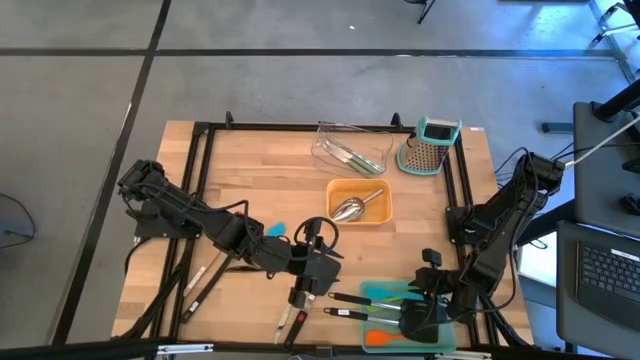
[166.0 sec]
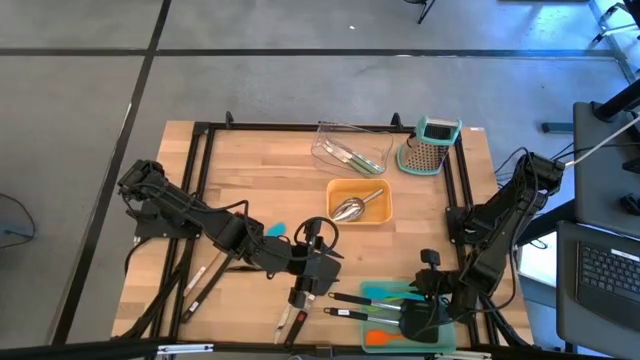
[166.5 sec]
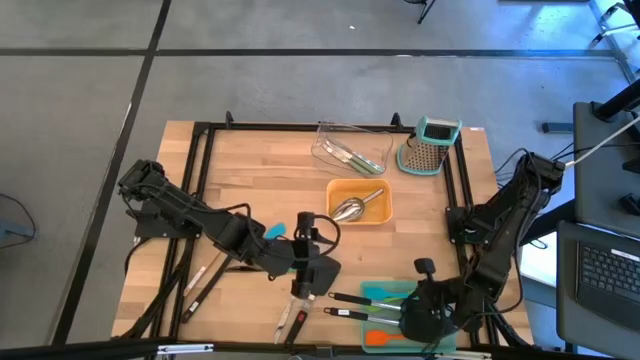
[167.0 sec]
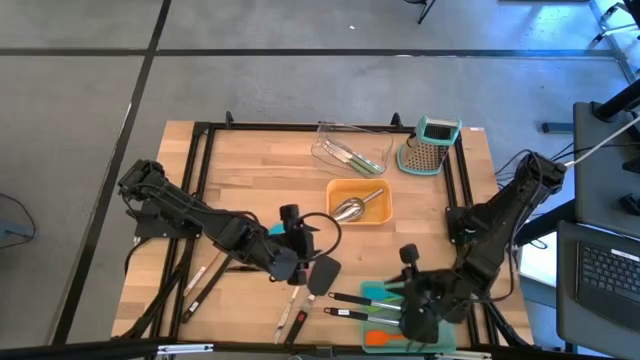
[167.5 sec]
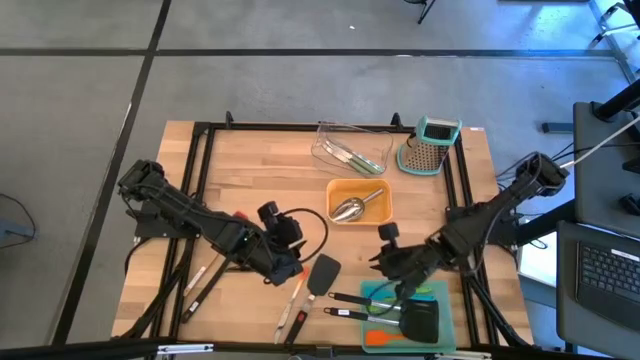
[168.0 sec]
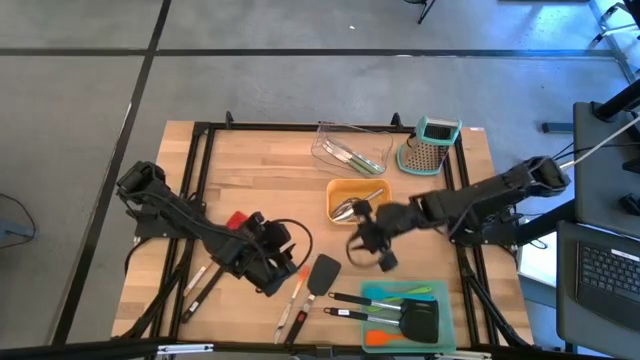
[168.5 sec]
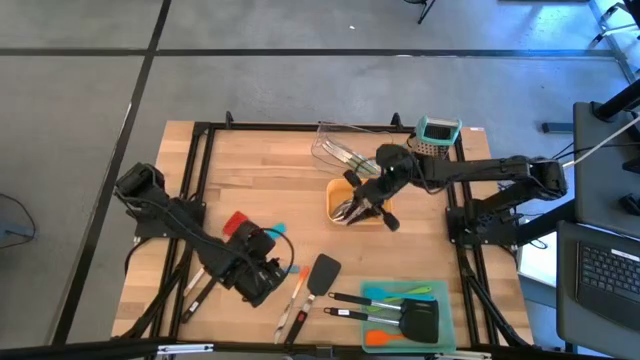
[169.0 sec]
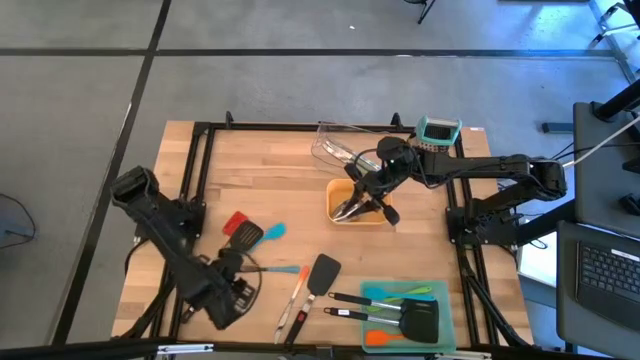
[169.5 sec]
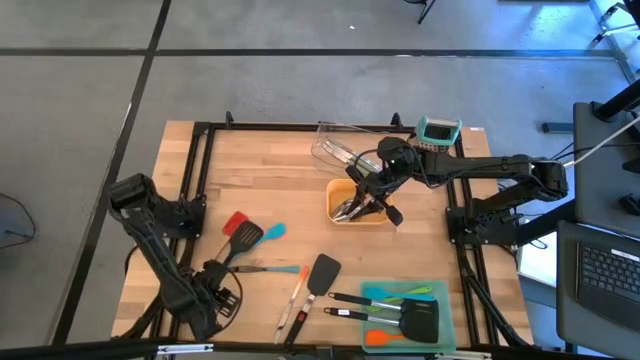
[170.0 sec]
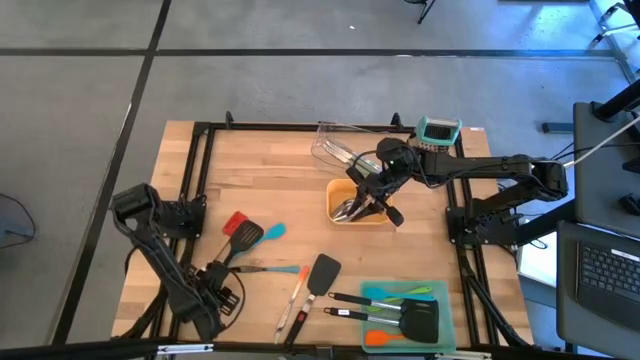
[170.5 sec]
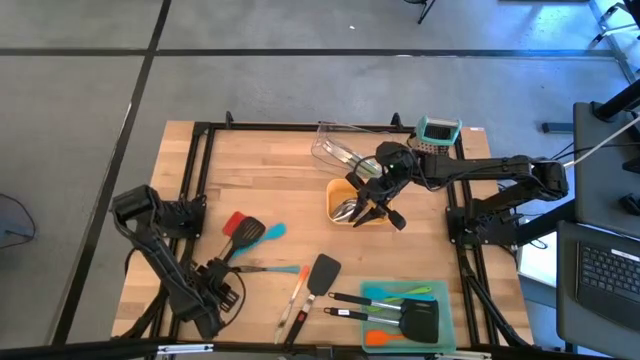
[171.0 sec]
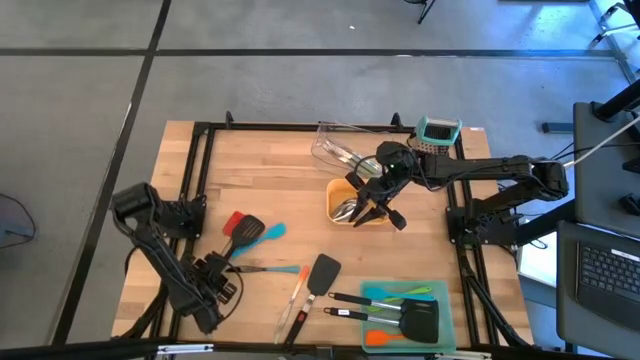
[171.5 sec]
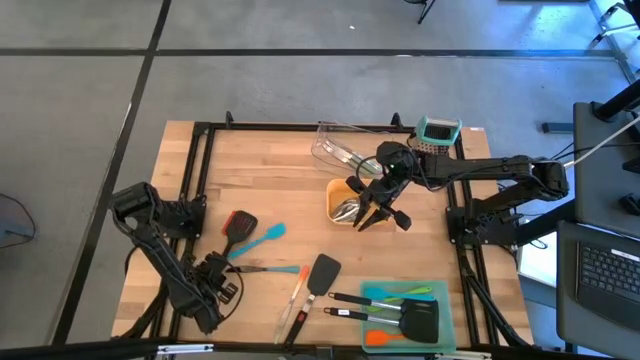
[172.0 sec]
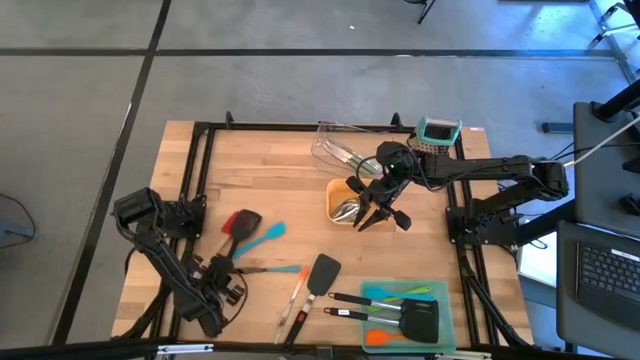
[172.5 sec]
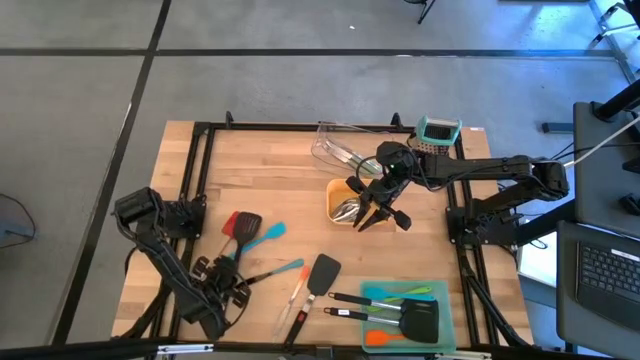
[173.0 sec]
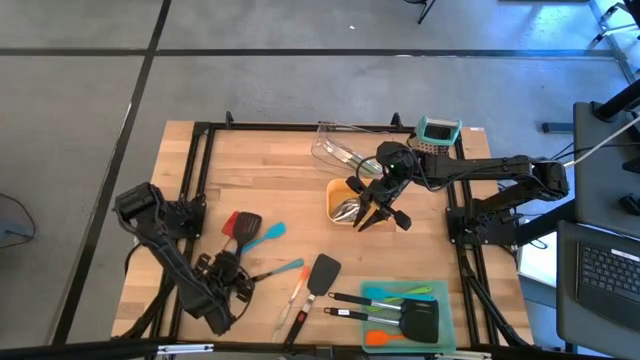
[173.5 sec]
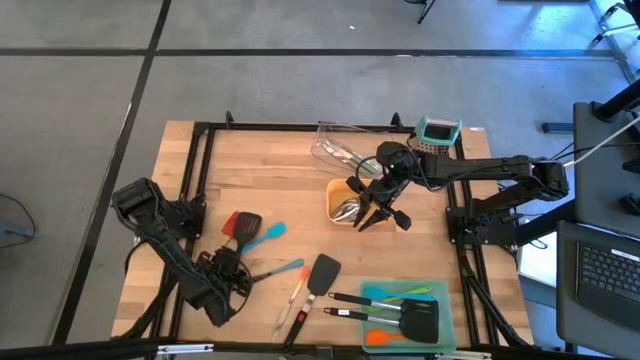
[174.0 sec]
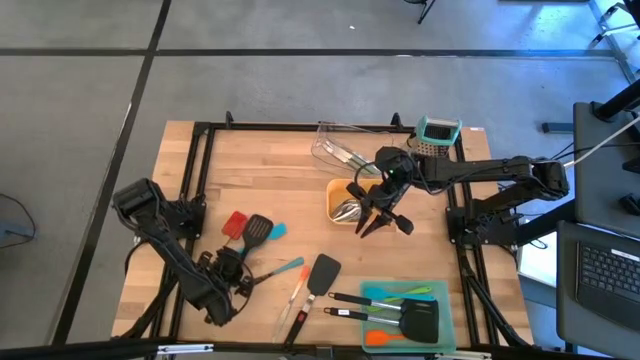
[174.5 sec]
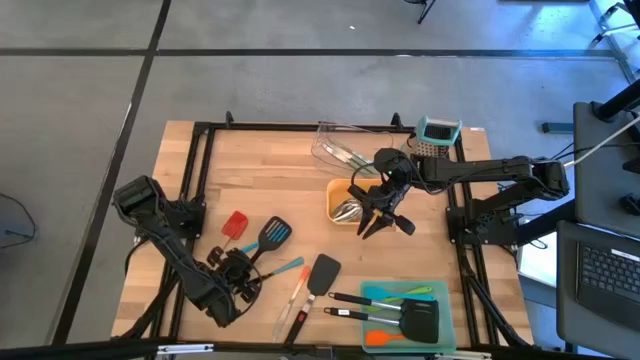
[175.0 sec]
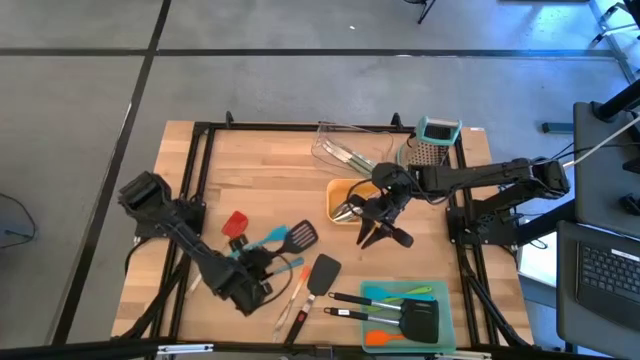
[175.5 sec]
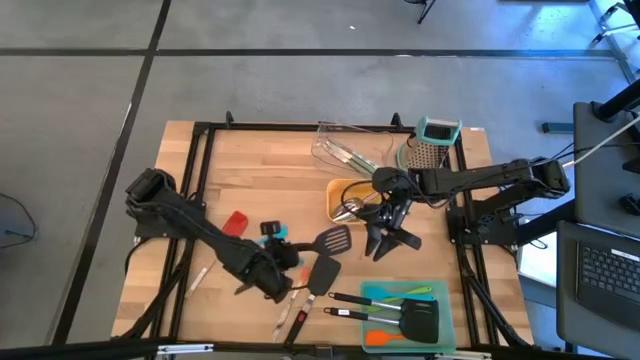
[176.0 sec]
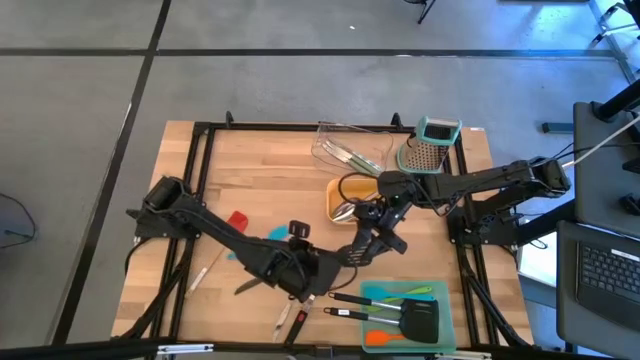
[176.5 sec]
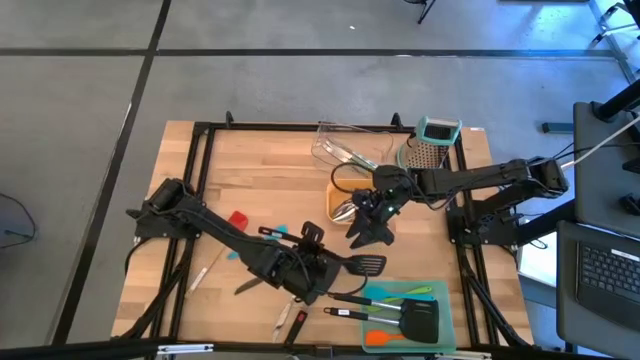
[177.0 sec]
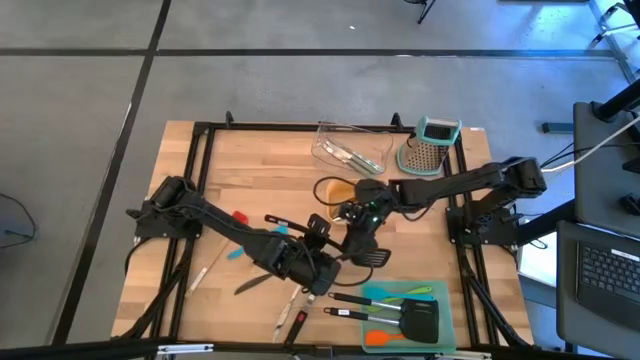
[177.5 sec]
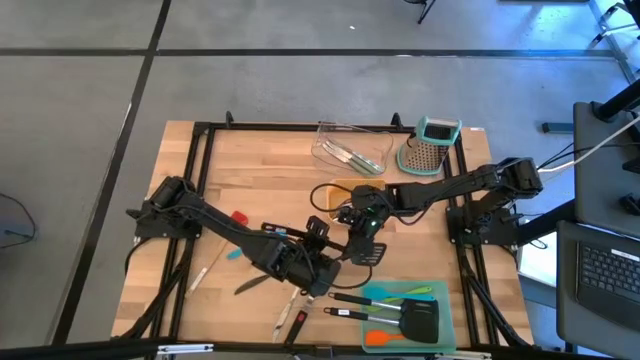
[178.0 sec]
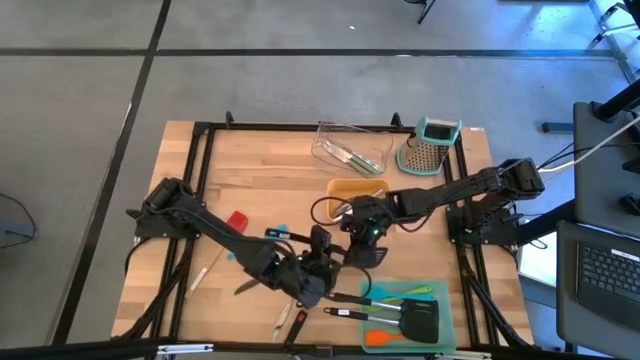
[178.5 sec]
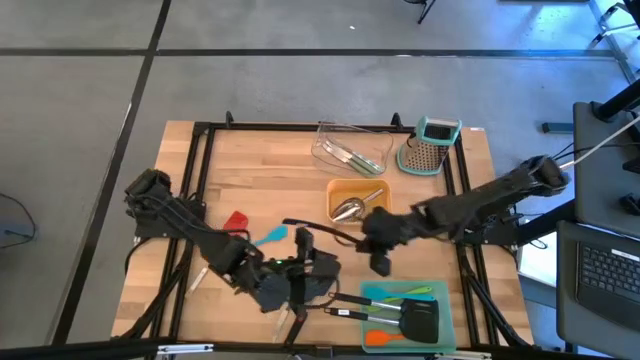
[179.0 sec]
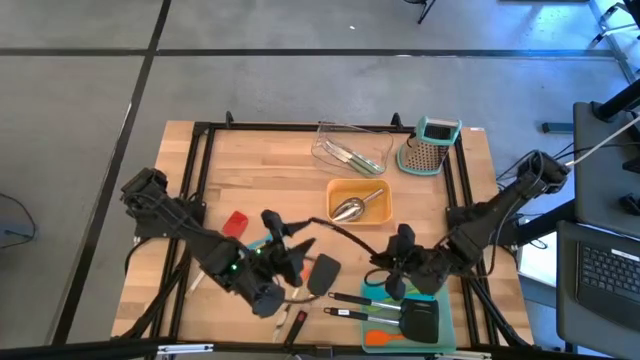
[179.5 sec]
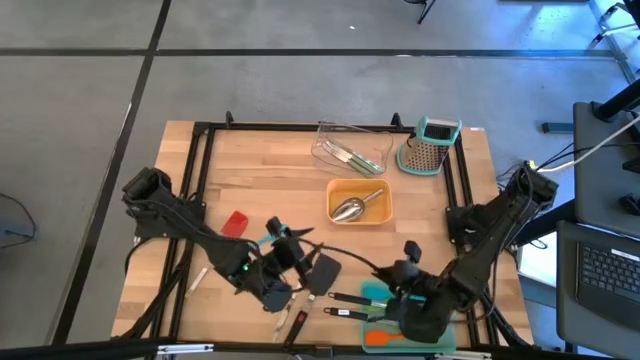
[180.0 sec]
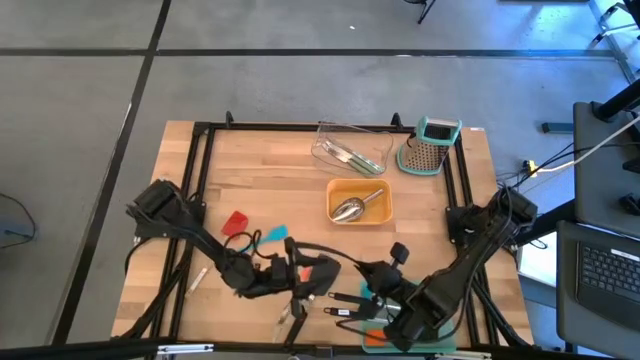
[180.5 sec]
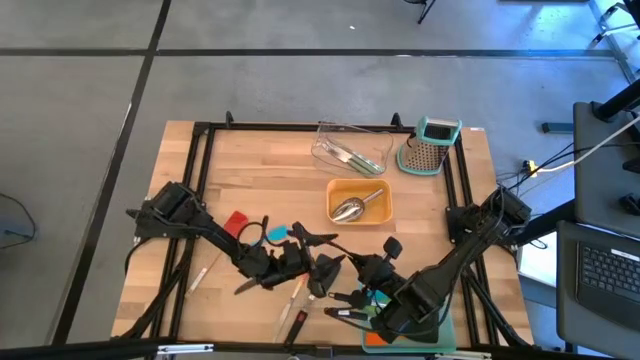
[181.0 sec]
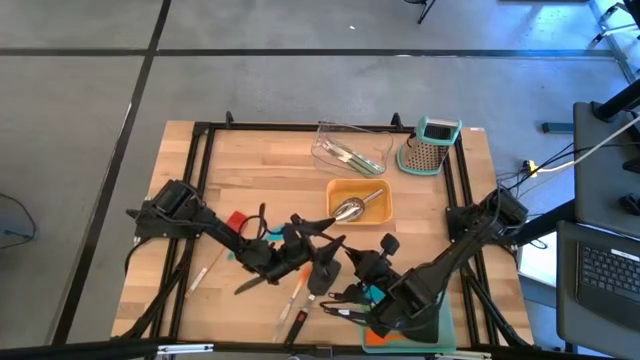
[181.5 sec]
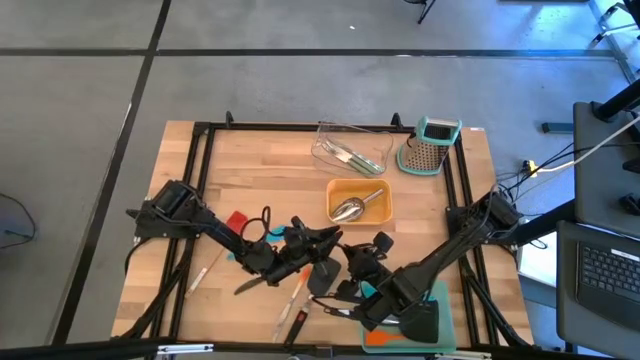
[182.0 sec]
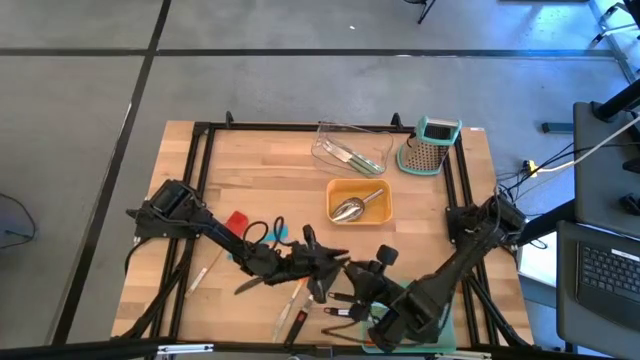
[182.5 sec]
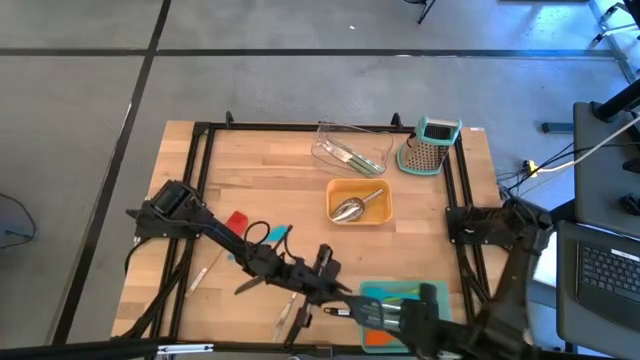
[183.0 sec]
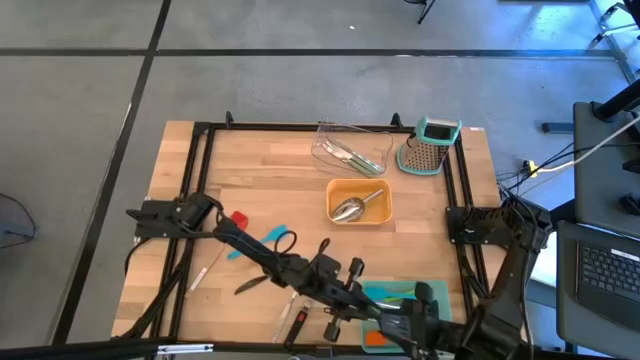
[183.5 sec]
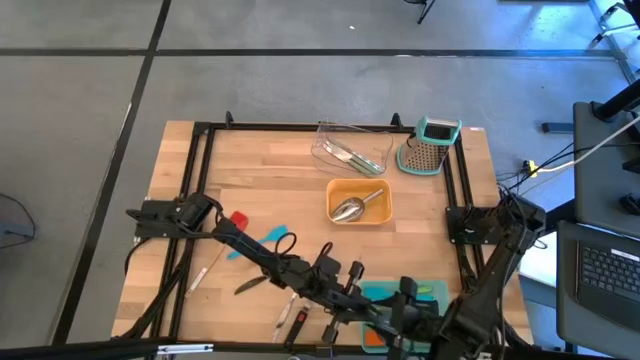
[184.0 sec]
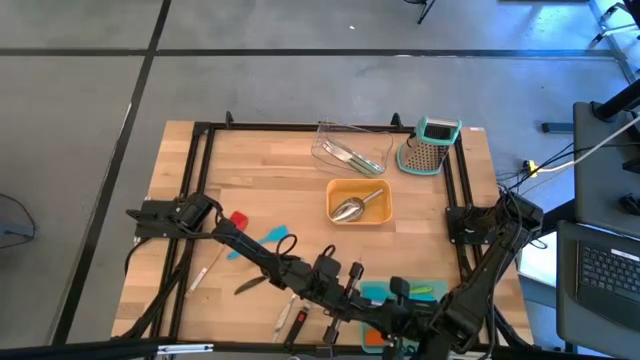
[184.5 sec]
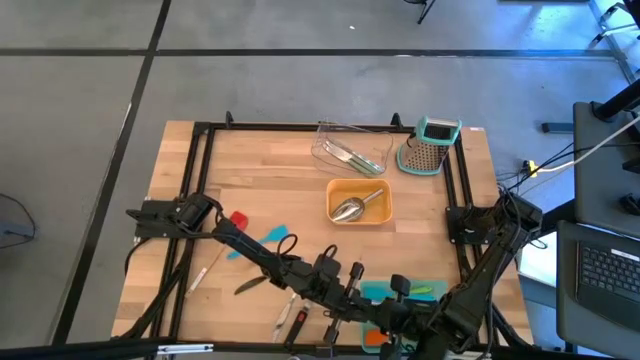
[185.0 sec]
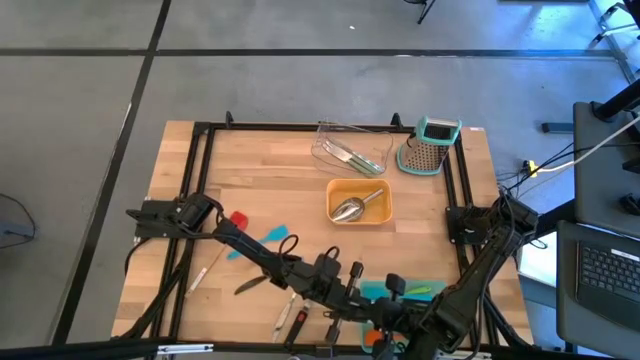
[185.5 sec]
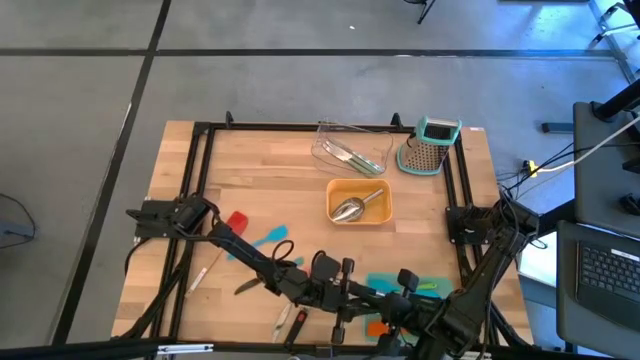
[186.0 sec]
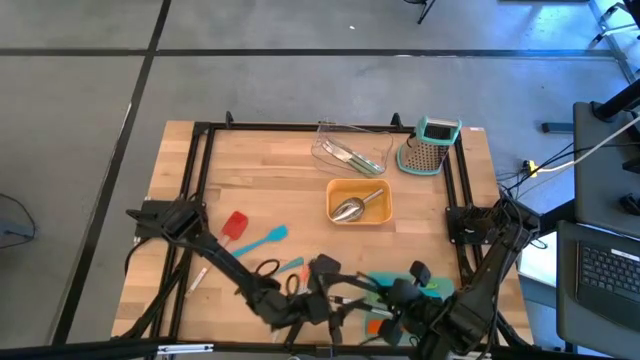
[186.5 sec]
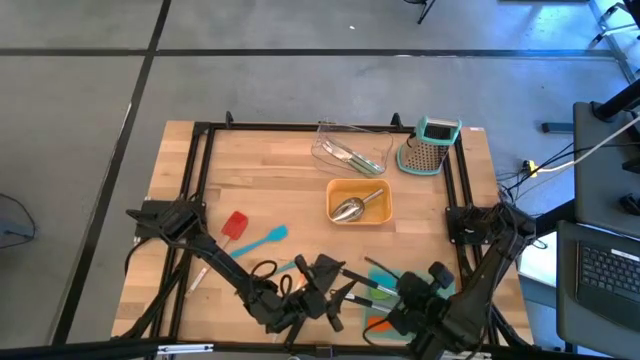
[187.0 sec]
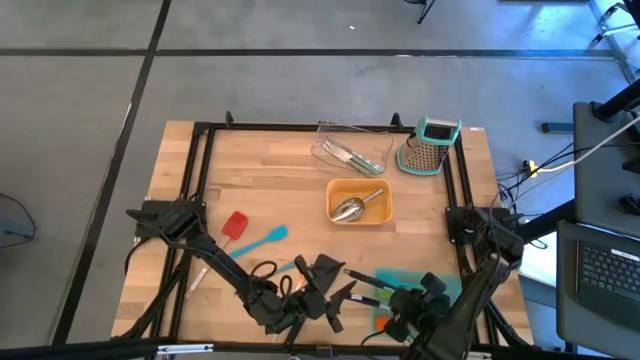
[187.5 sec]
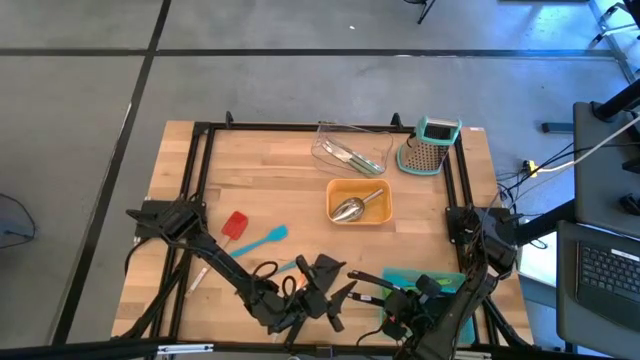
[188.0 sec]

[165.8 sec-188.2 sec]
Task: Pick & Place Kitchen Items
Put the black spatula into the green bin
